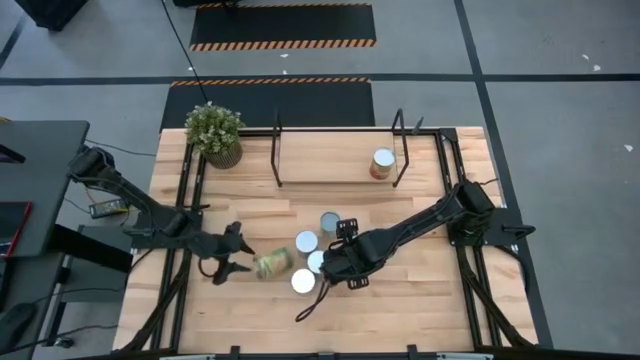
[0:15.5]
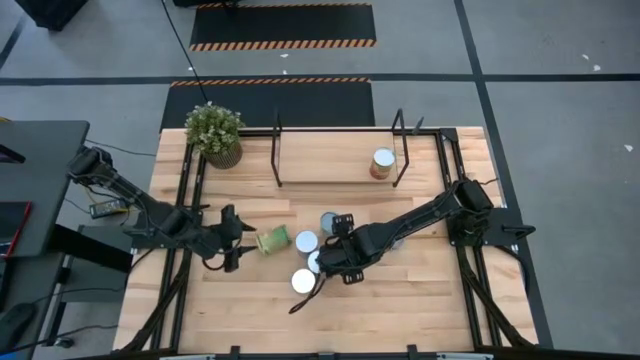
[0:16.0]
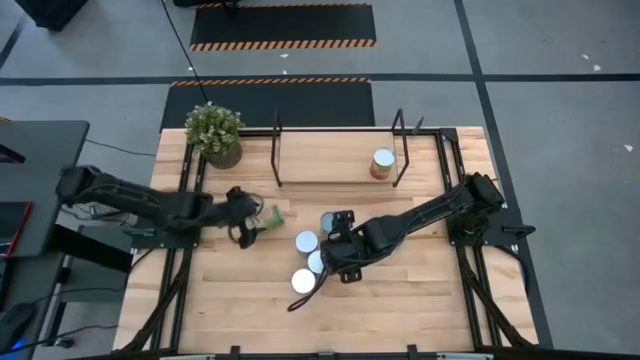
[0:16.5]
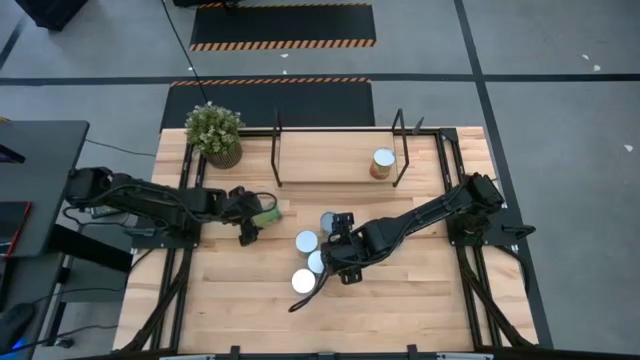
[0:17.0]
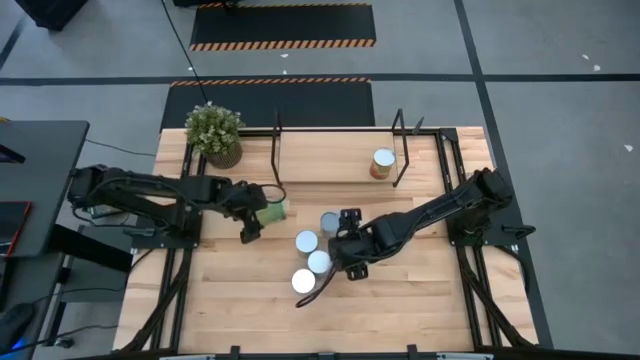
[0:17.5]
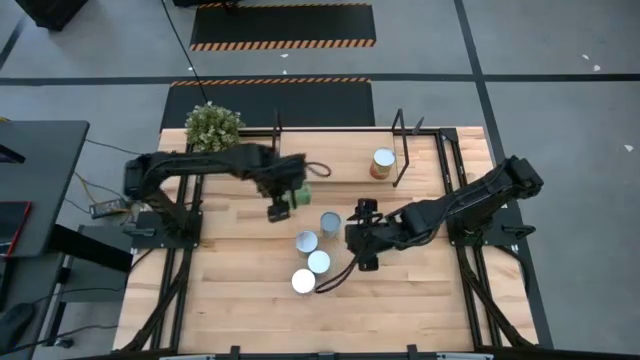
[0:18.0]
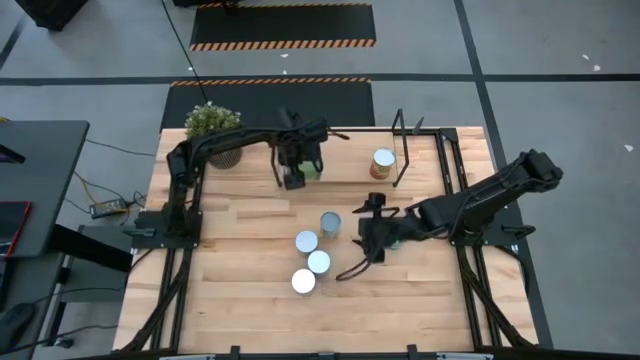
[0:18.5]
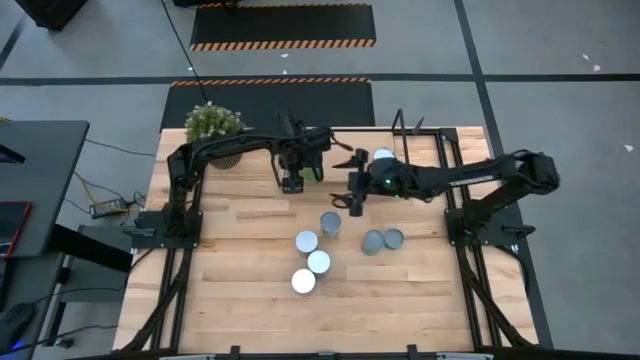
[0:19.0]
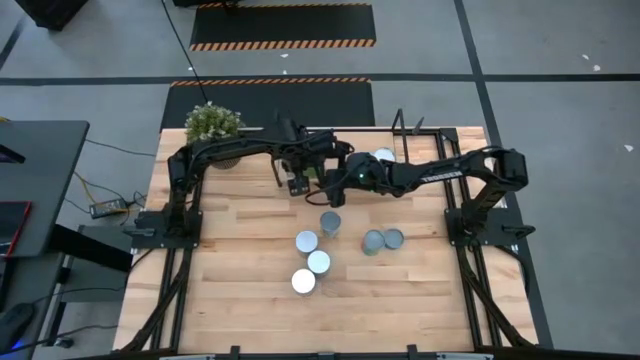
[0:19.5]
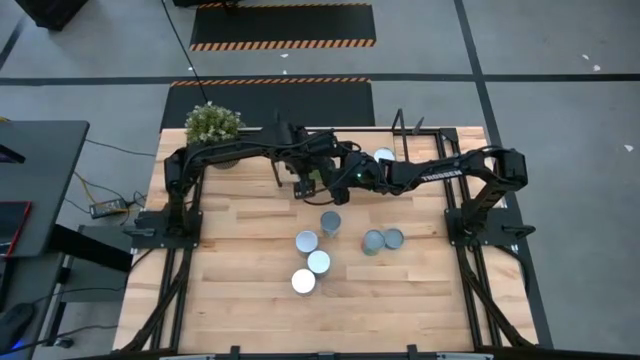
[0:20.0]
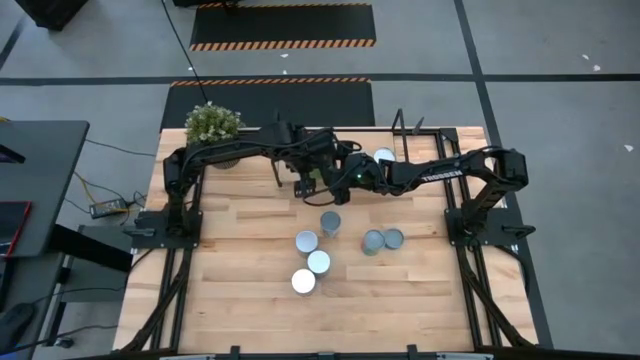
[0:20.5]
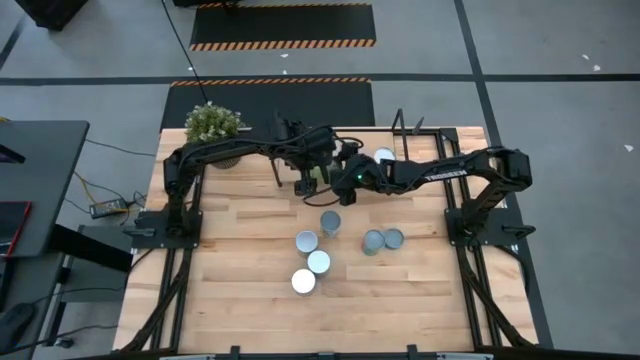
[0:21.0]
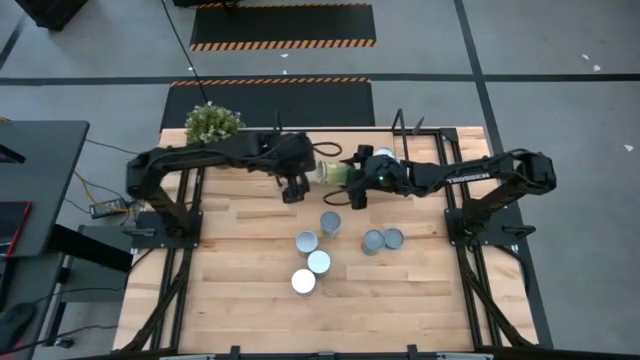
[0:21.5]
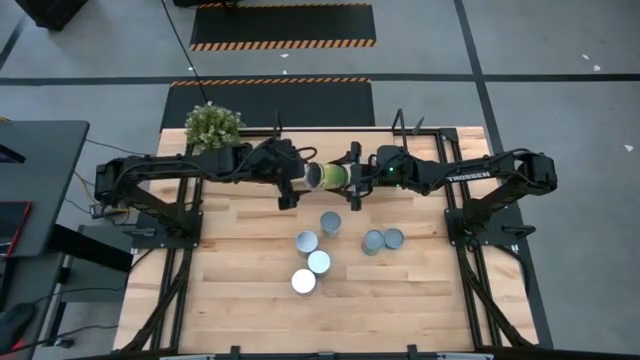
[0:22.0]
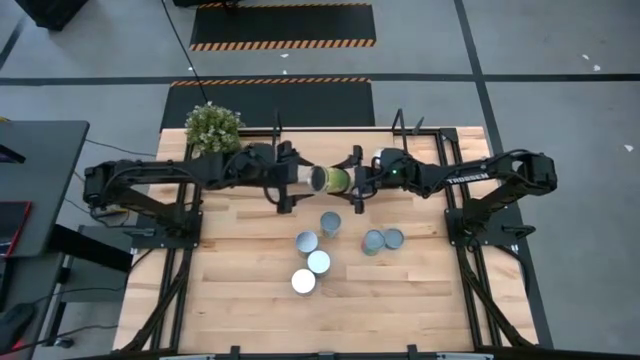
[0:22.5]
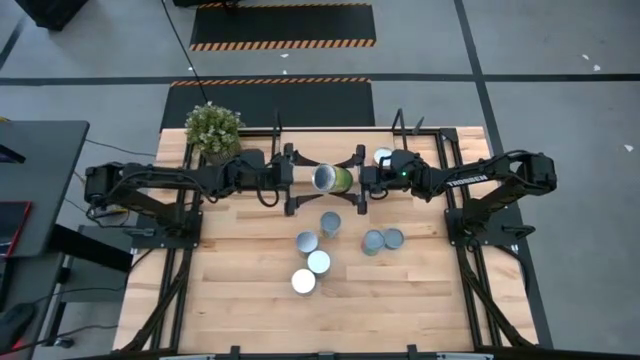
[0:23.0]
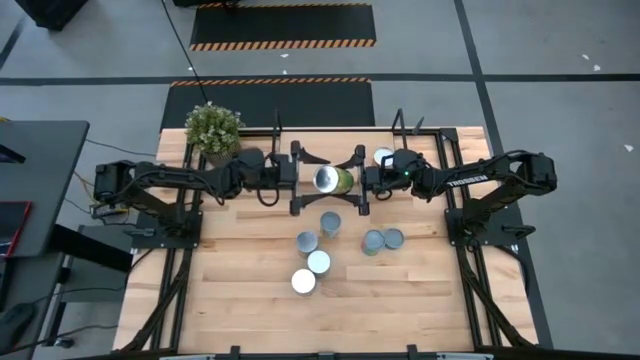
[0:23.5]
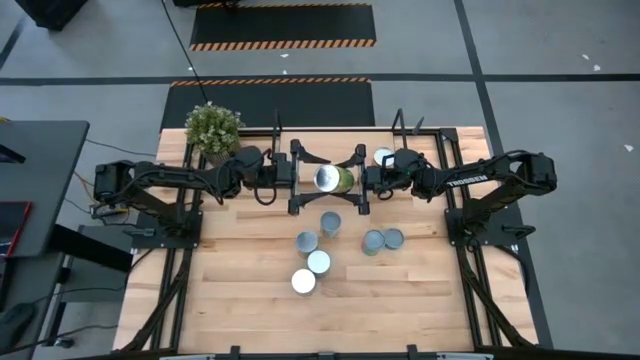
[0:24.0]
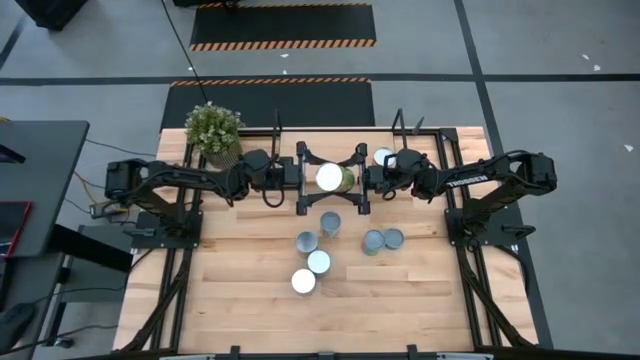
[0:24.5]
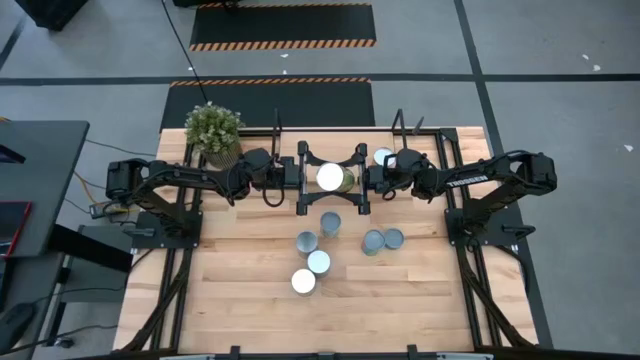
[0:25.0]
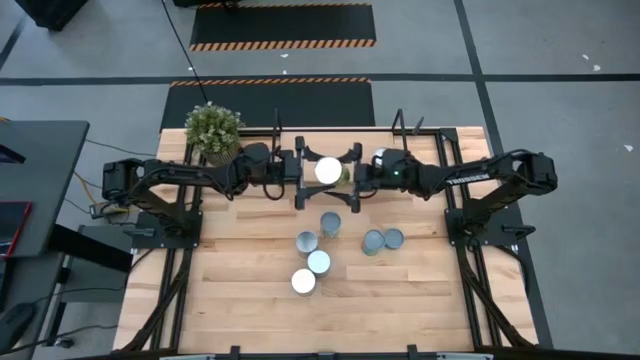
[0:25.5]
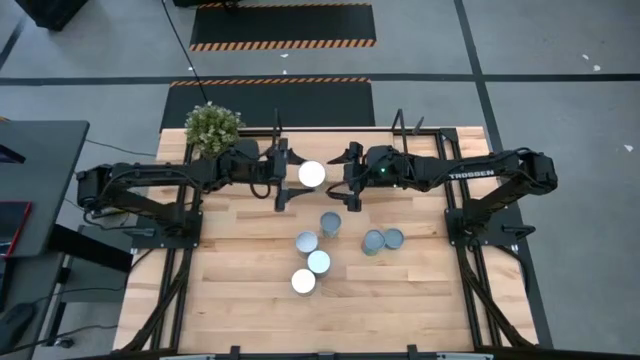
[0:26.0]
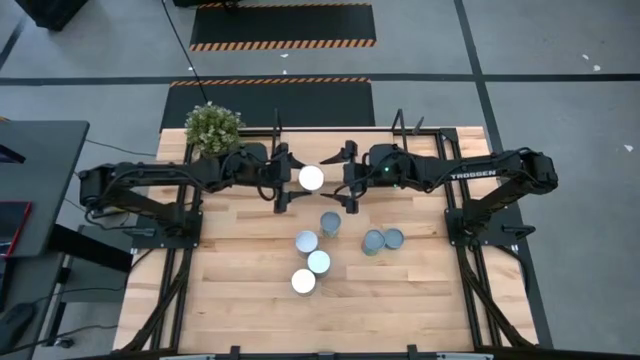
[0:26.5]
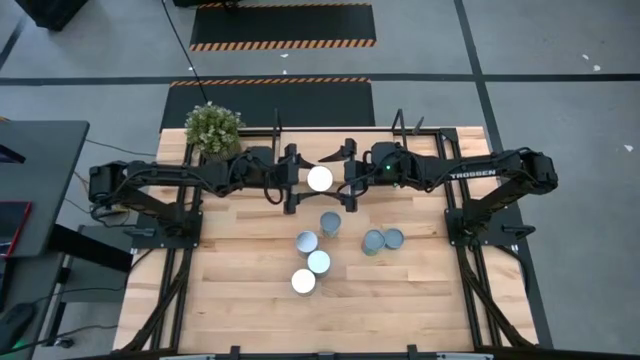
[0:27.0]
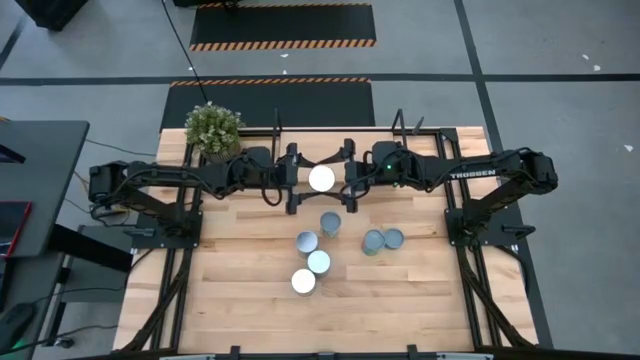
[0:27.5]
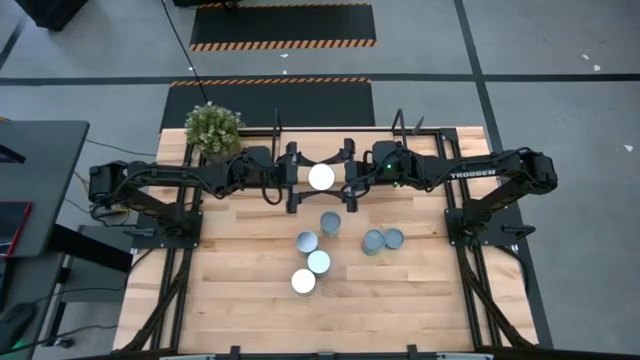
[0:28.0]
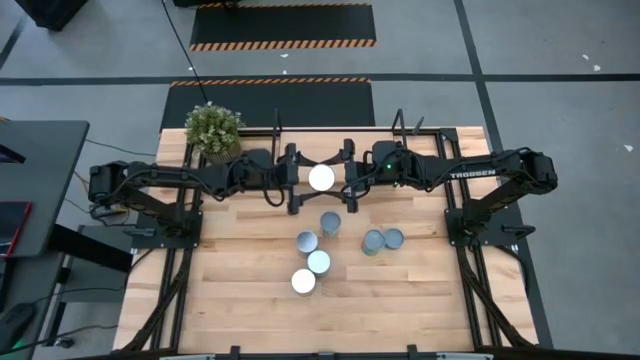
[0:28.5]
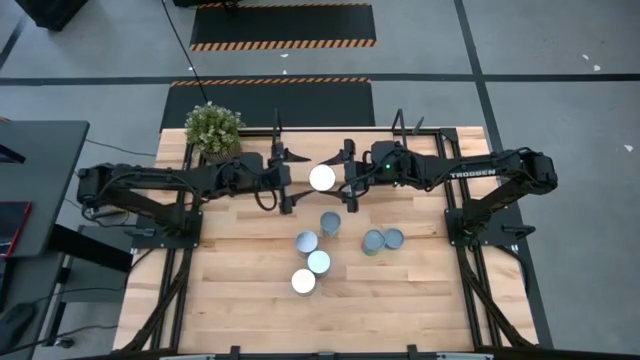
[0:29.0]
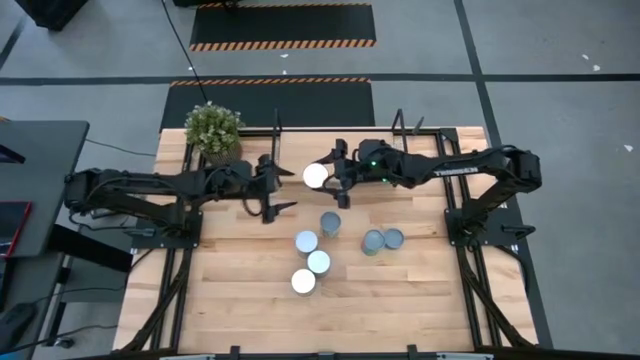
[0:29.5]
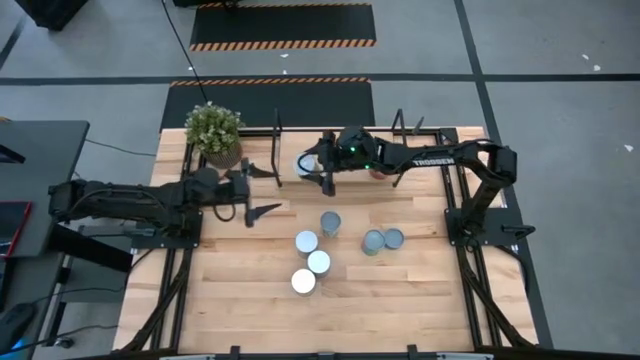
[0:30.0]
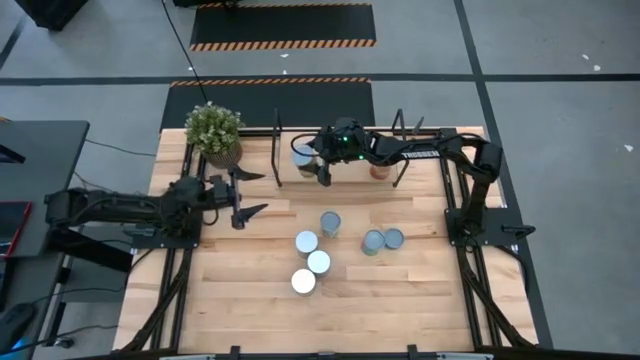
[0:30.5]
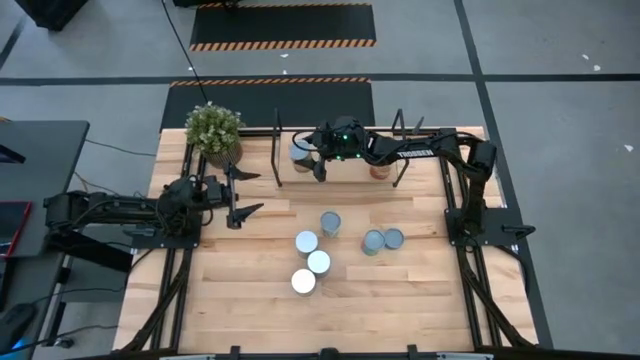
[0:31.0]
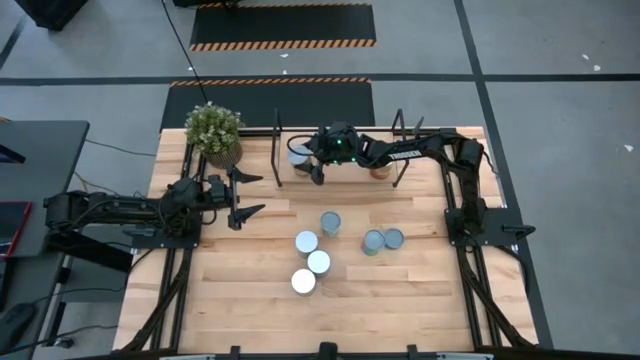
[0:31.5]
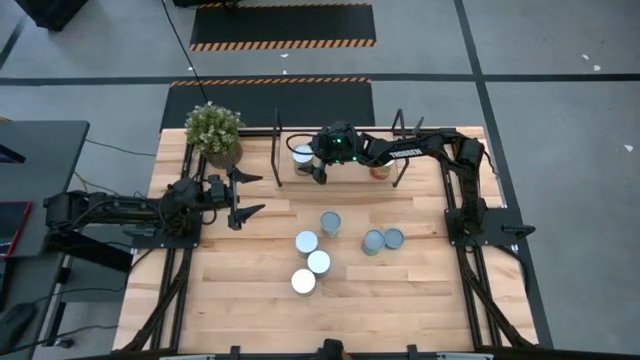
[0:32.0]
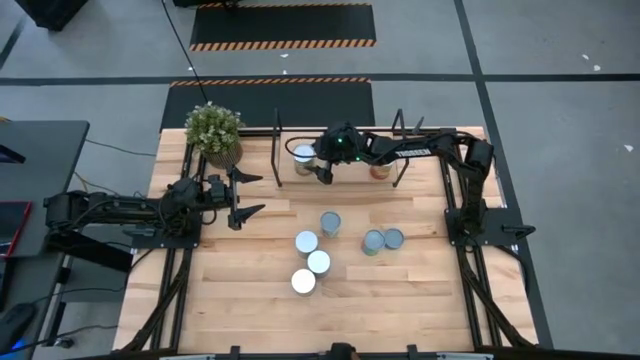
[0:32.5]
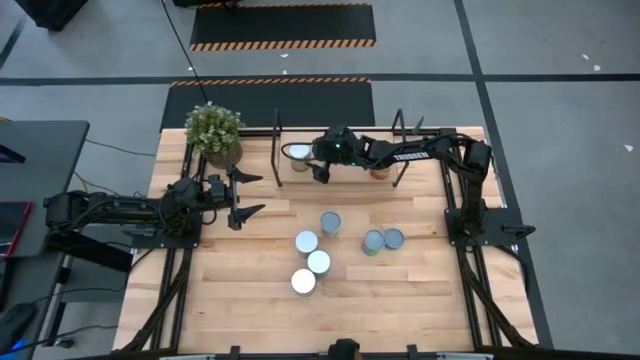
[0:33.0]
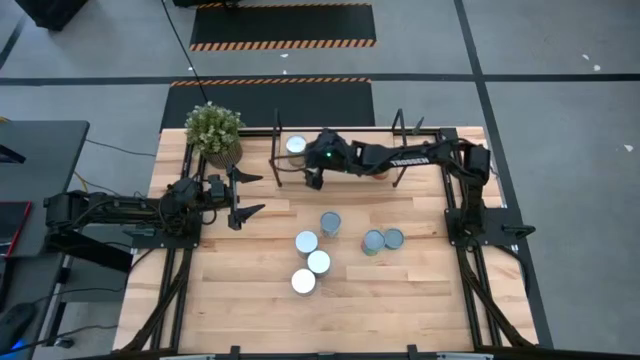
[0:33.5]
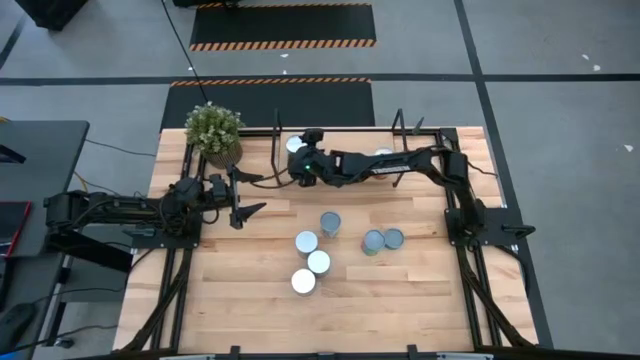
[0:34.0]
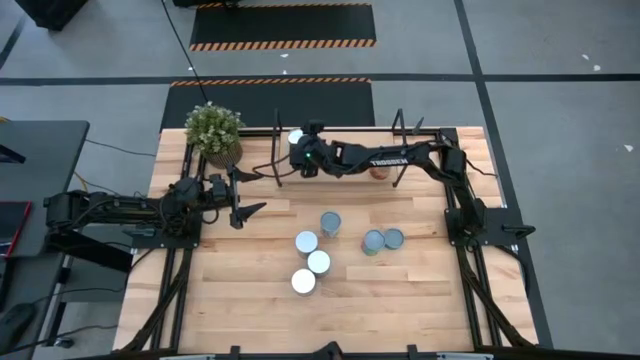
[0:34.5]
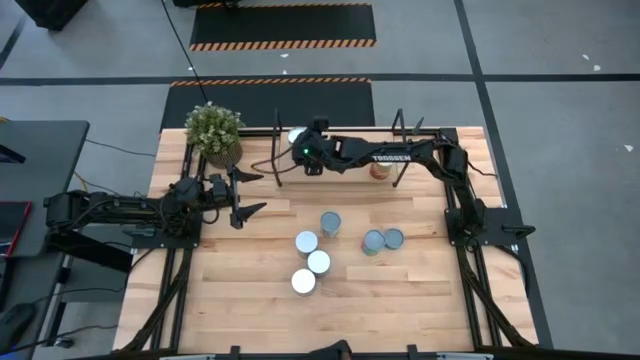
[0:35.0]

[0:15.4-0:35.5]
Task: Pick and place cans onto a shelf
Put the canned oranges on the shelf
